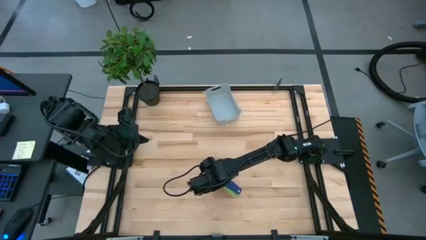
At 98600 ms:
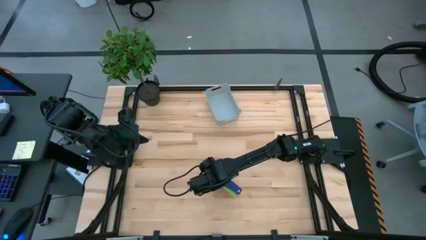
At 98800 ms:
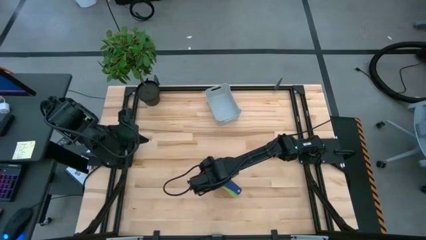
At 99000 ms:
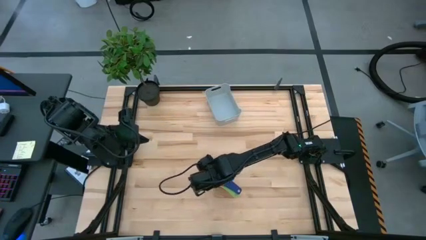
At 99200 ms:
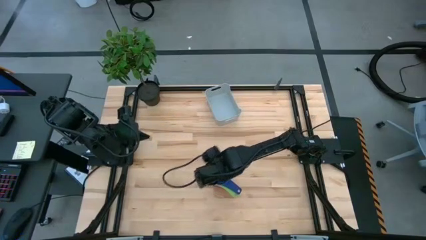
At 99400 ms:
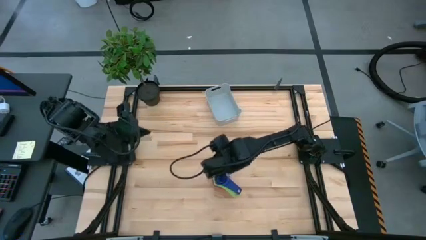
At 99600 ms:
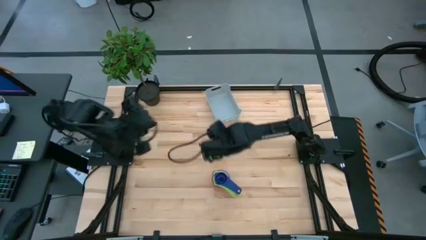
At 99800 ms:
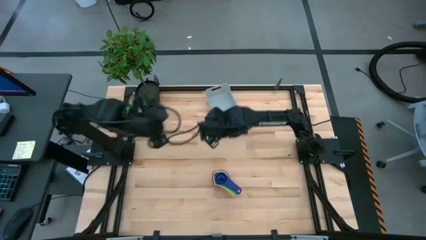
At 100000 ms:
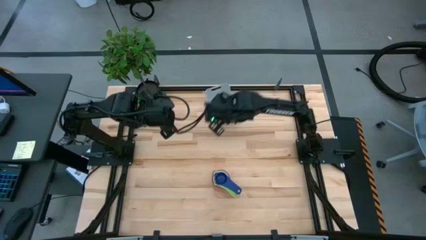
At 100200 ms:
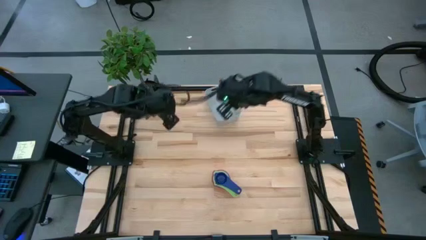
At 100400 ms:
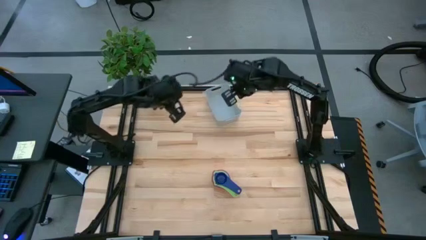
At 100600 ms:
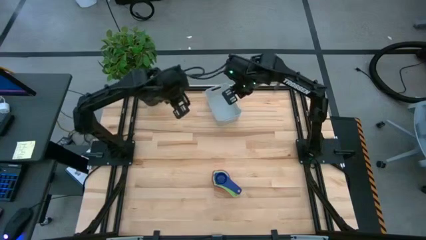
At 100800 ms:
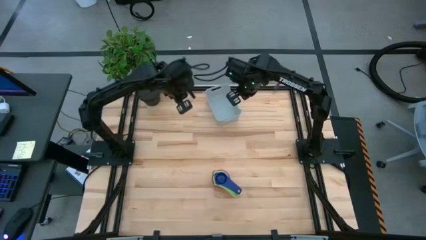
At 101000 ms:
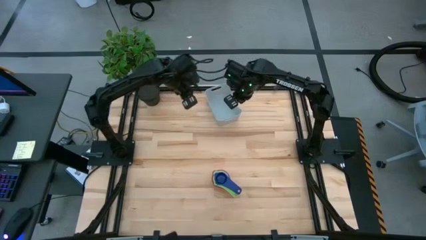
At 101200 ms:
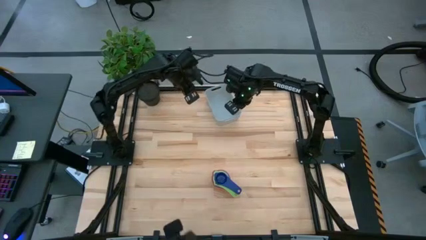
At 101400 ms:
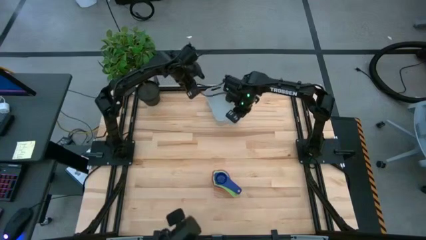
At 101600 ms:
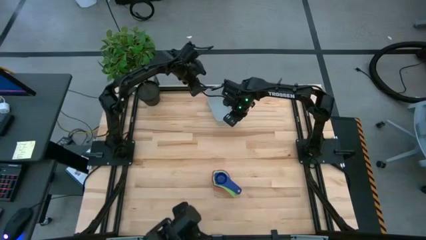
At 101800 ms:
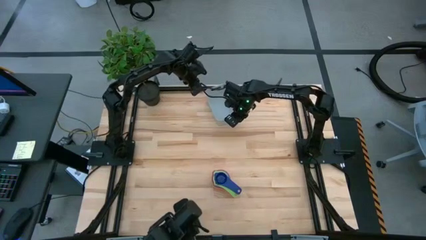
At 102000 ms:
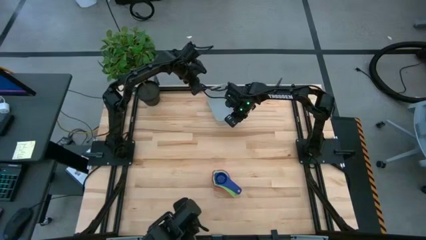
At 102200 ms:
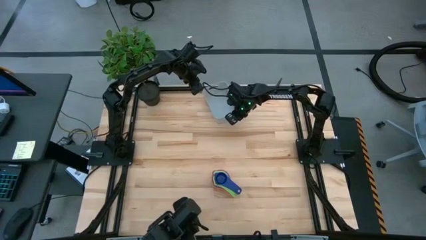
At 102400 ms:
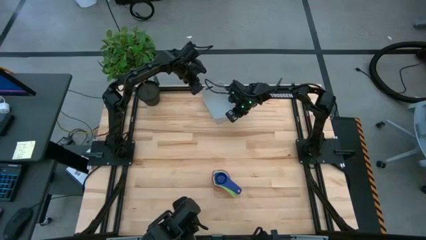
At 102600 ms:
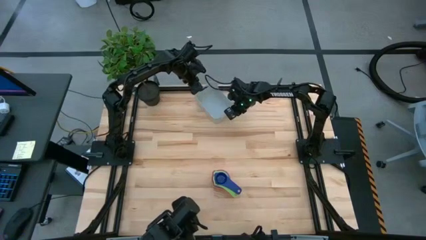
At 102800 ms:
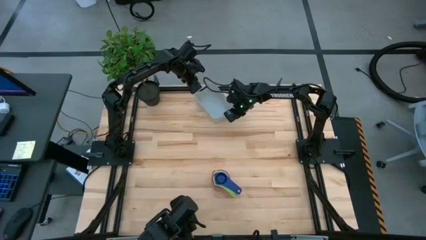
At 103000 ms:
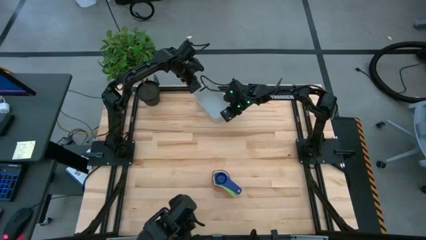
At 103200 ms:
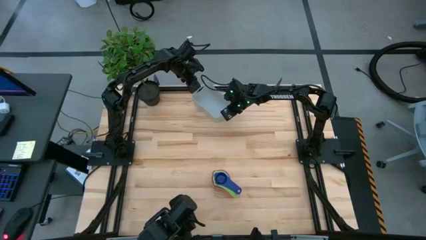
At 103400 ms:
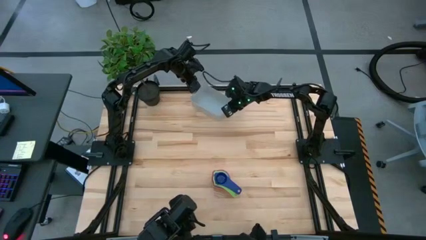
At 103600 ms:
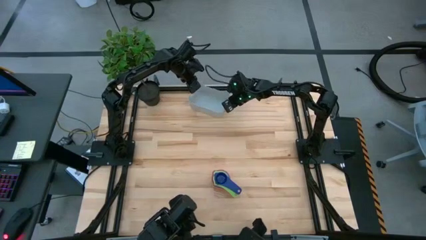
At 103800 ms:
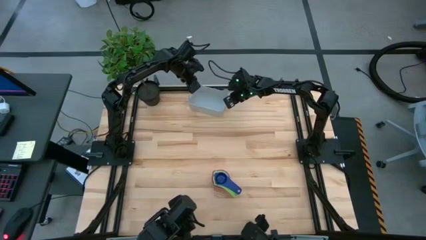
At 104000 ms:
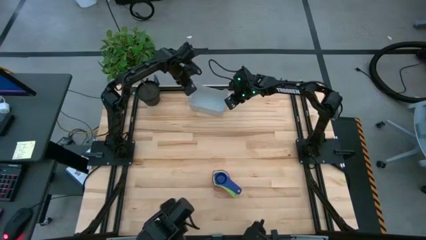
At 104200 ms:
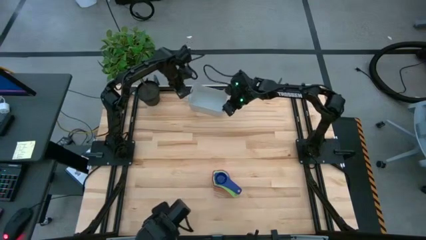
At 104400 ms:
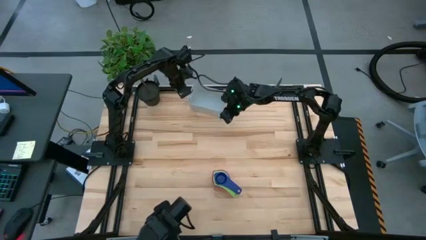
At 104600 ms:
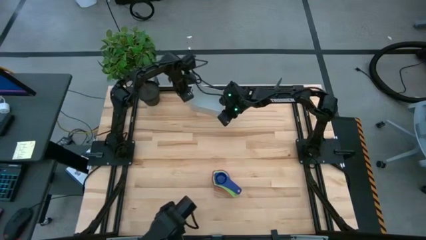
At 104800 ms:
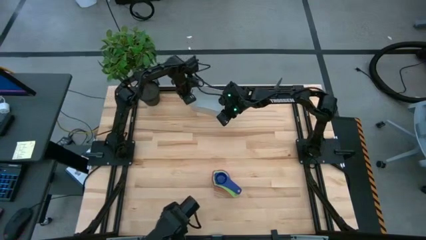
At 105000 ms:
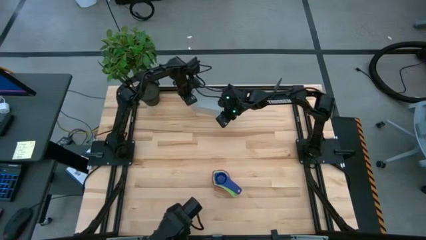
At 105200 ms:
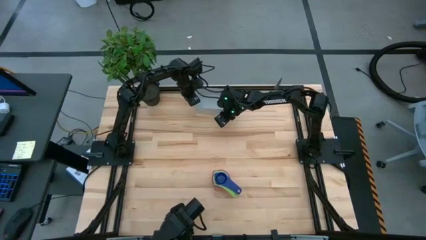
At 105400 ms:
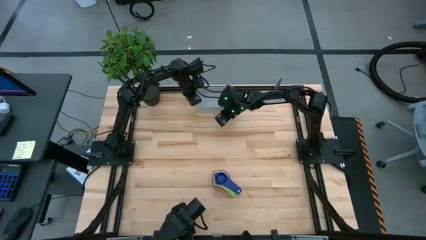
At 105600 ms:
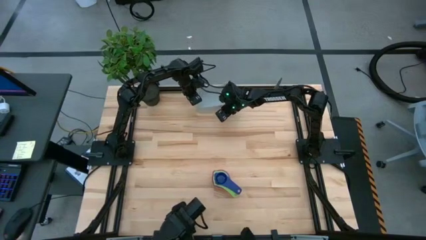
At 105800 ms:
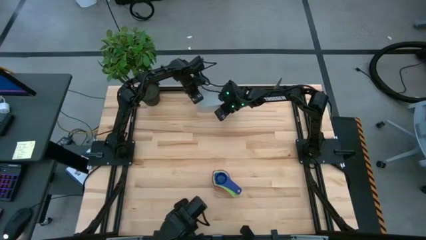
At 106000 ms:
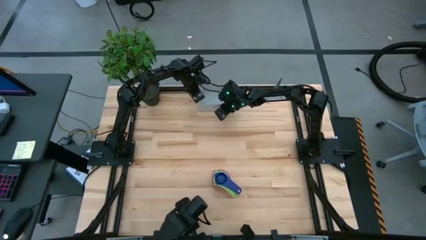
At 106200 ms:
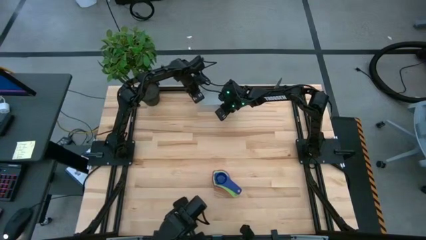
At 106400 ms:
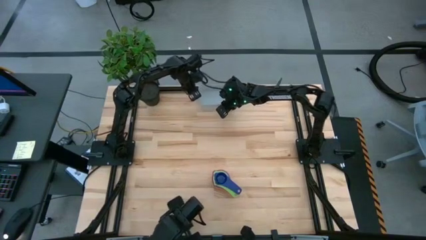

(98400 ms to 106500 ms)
Task: Nest measuring cups in basket
Adjust the gray bin on the table

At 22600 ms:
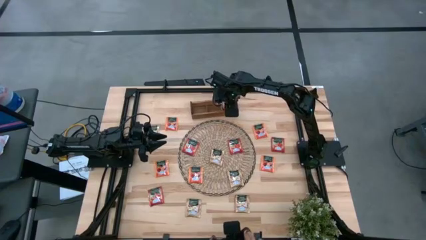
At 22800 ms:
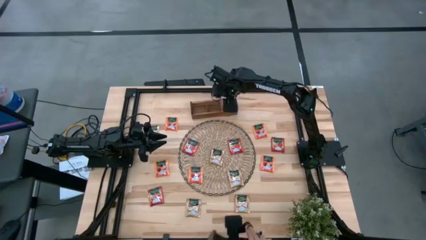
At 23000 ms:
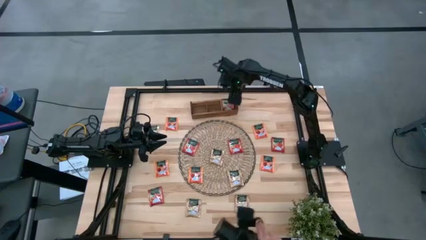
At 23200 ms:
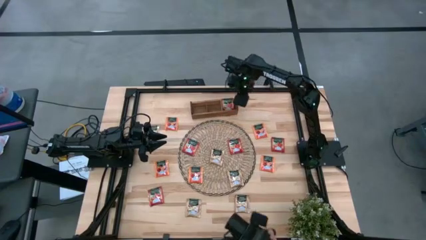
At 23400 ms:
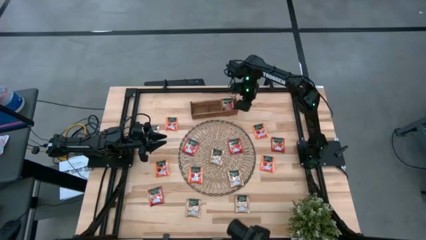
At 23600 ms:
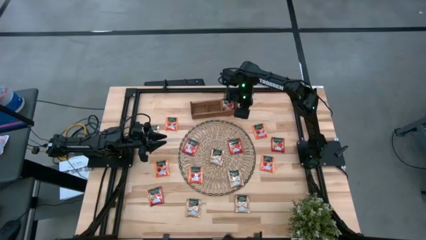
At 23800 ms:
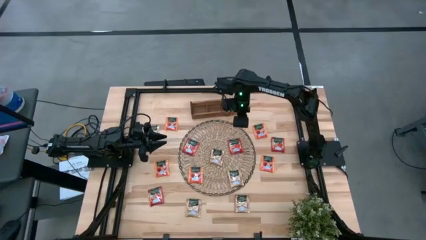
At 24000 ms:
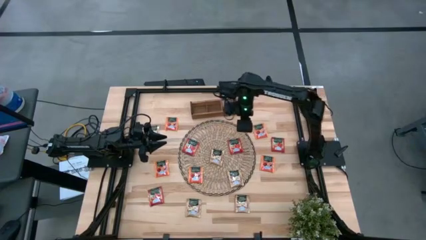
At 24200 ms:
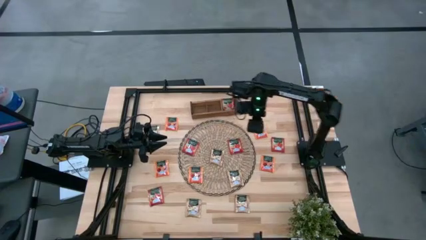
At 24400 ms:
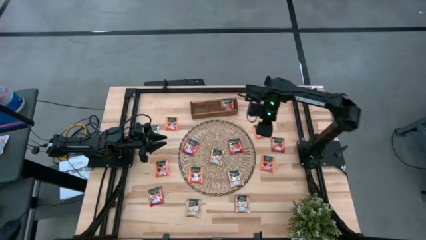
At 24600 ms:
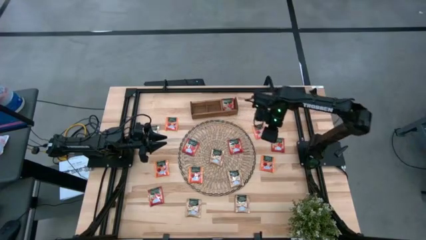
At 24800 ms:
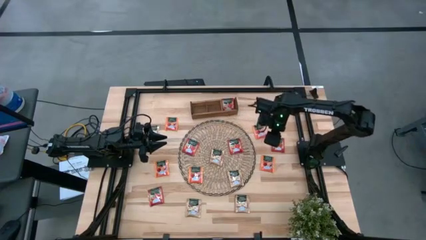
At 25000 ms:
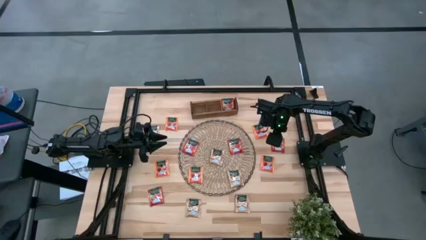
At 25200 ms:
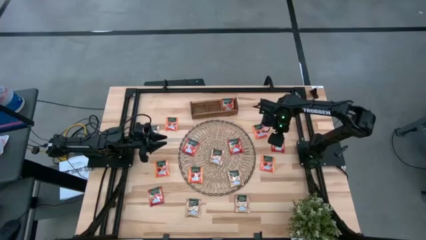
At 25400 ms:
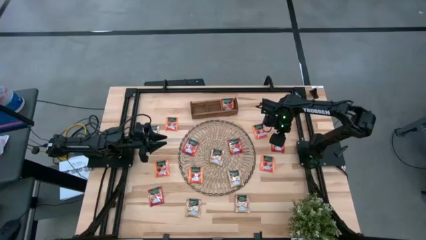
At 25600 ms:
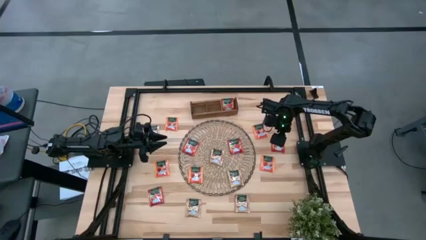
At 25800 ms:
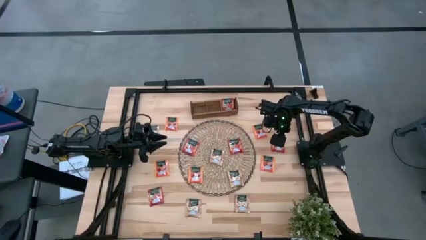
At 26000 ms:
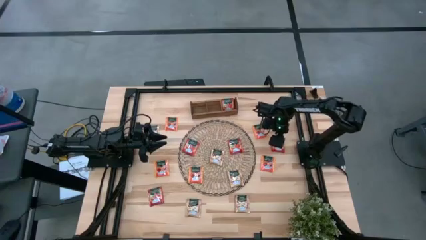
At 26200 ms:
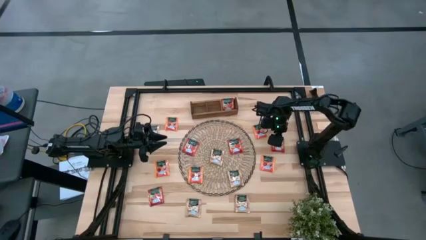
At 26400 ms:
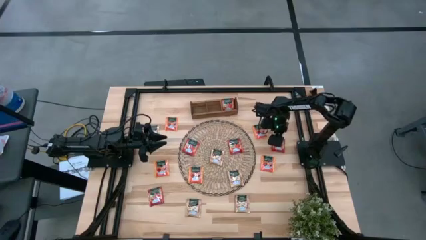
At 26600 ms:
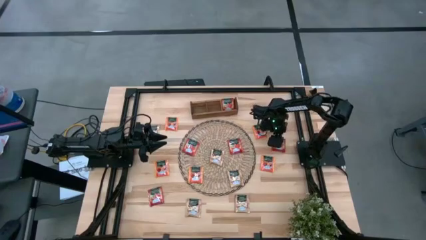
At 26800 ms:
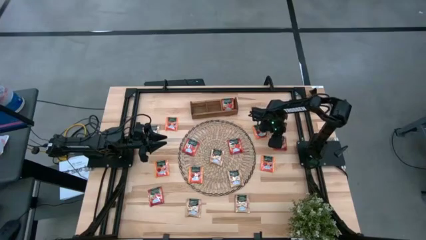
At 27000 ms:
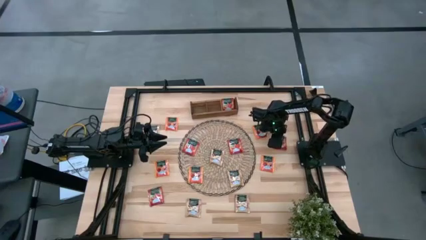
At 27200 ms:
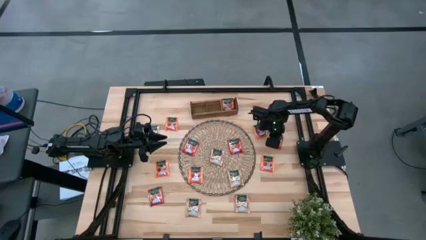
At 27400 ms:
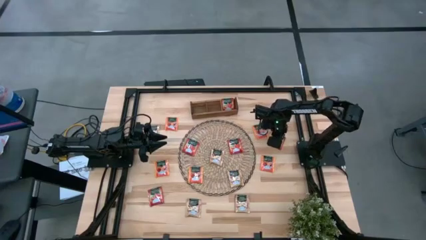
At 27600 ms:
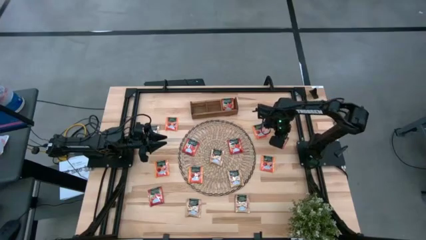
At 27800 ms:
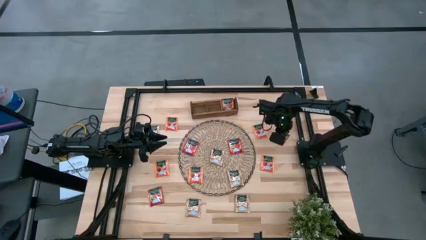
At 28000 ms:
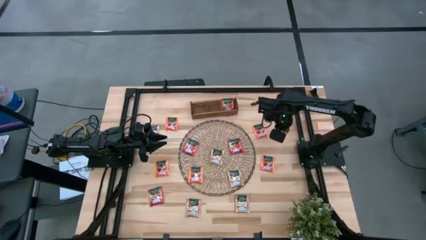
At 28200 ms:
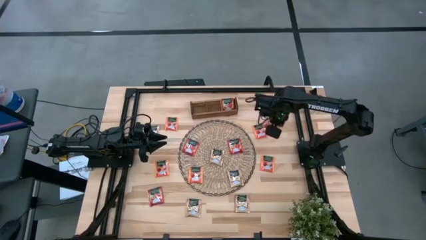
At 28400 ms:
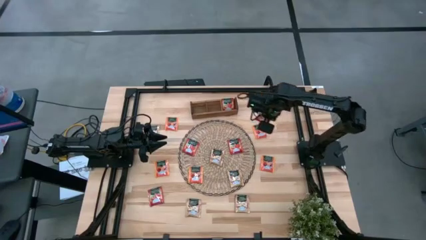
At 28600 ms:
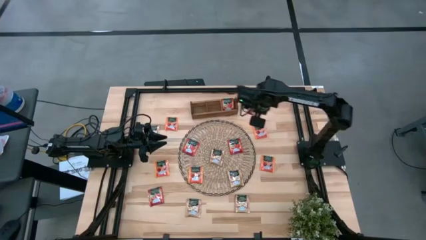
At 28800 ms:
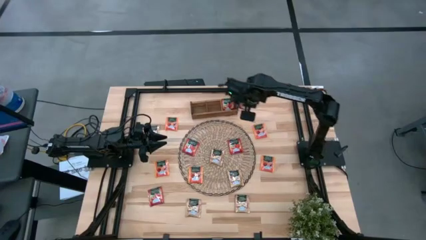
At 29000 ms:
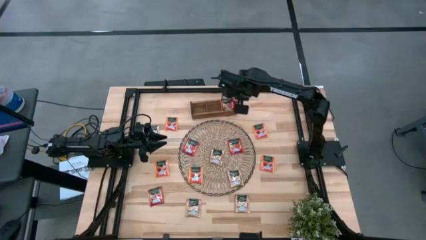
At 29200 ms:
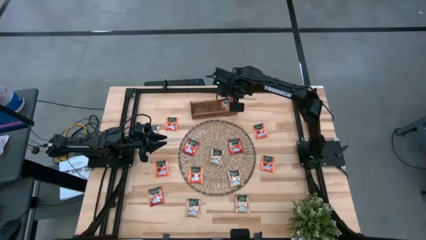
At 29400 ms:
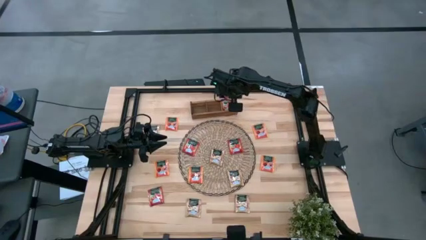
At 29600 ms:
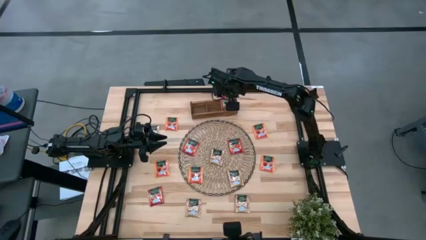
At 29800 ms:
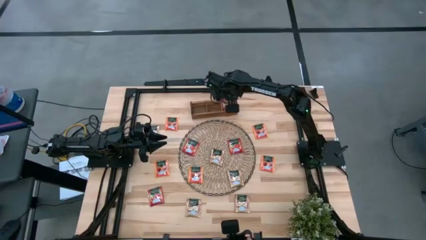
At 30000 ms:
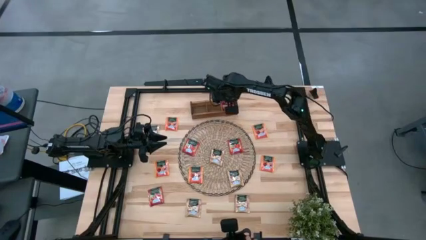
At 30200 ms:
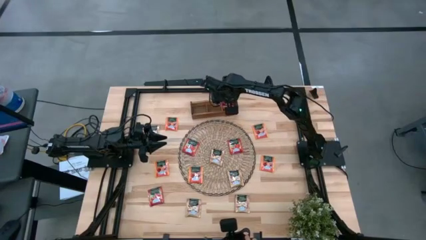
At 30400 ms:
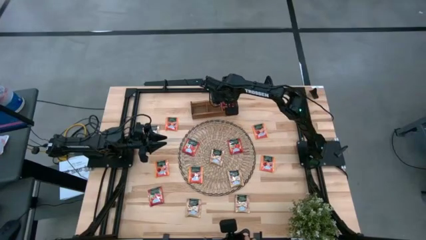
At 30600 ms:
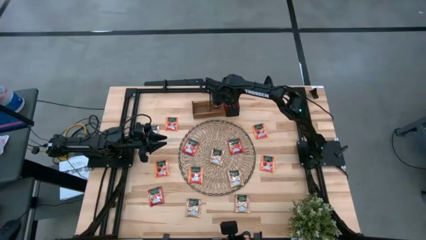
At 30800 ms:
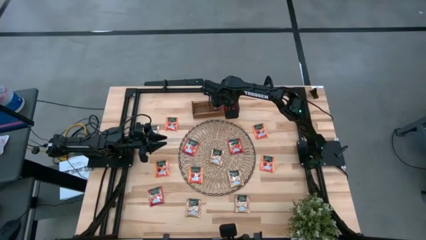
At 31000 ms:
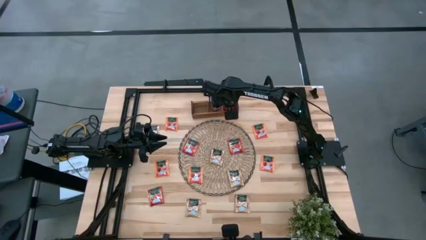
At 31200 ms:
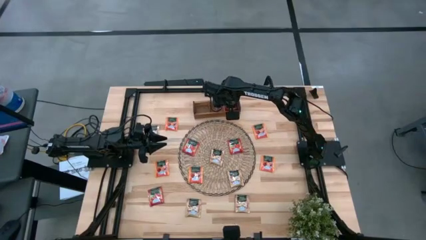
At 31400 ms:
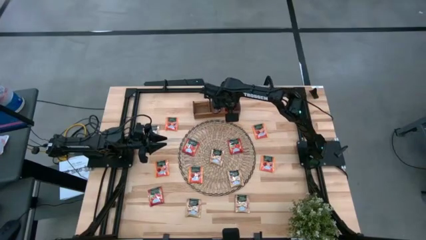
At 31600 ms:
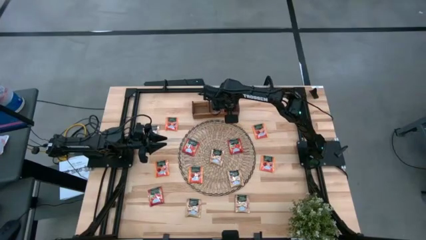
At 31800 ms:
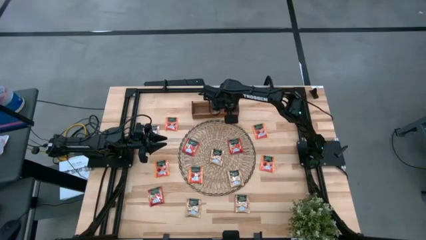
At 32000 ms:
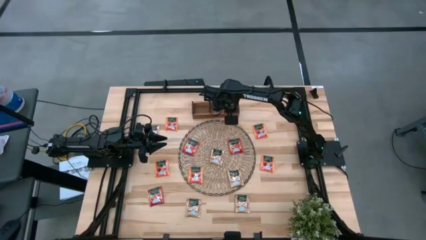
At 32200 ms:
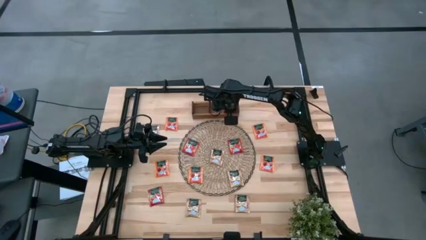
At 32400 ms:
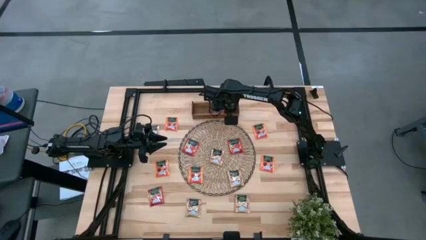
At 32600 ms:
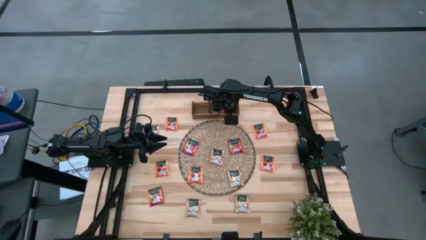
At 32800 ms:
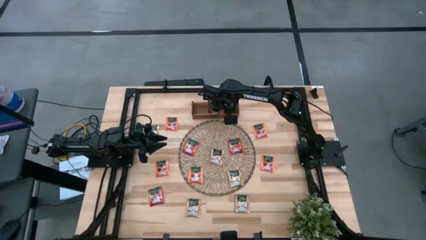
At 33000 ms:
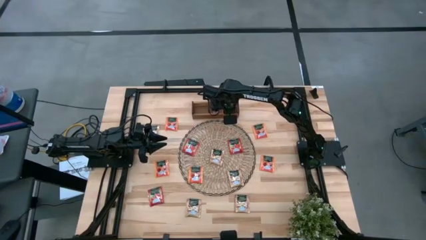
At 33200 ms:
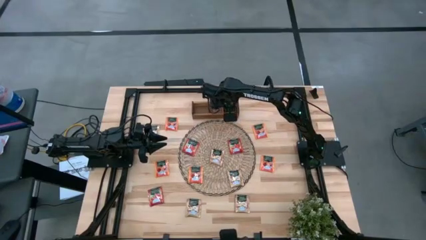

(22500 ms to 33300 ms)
Task: Pick & Place Tea
Put the red tea bag into the right section of the wooden organizer
